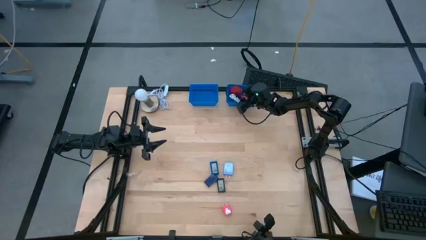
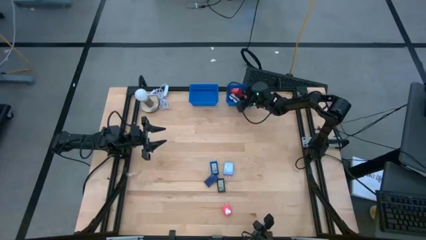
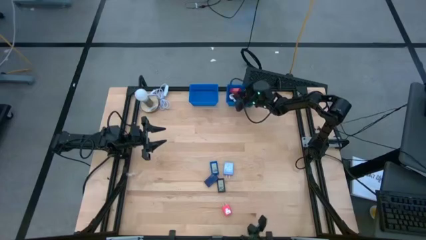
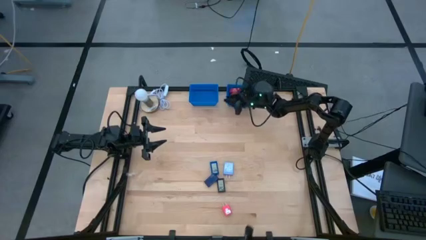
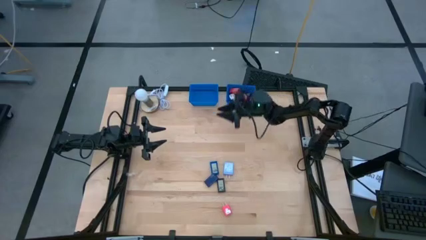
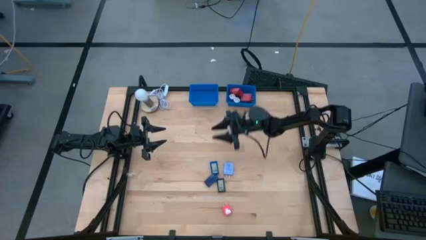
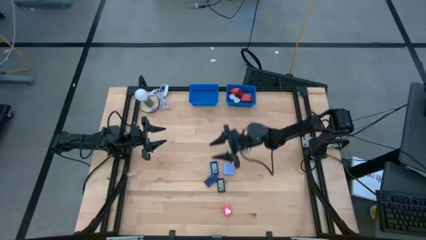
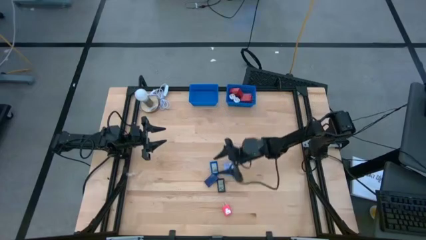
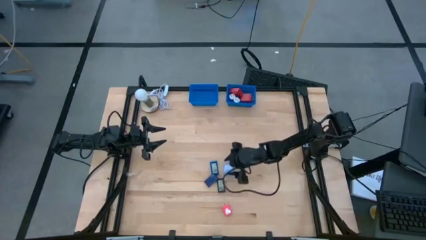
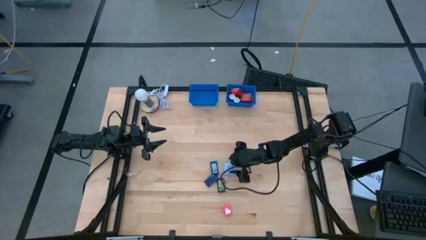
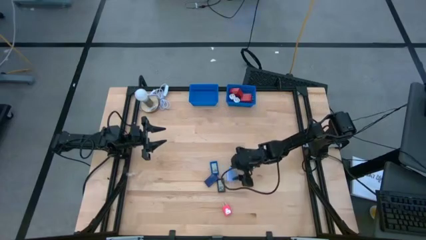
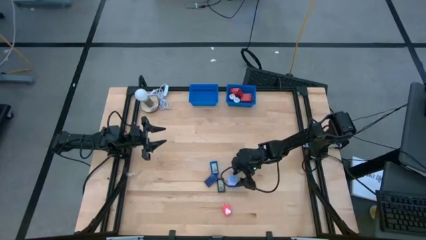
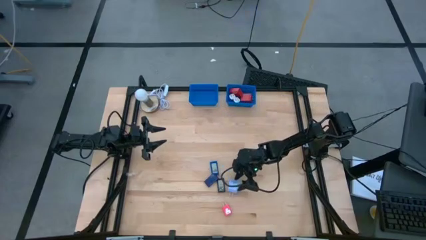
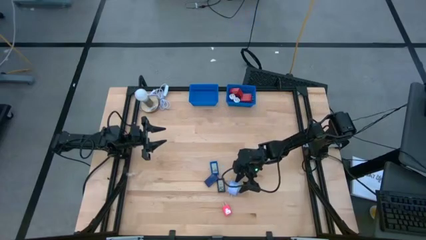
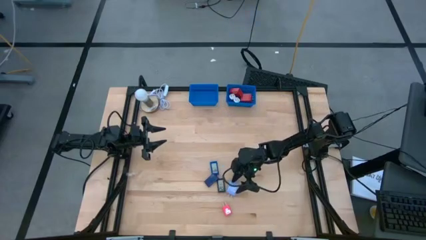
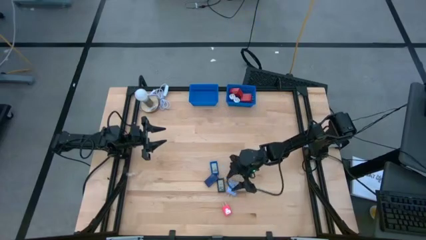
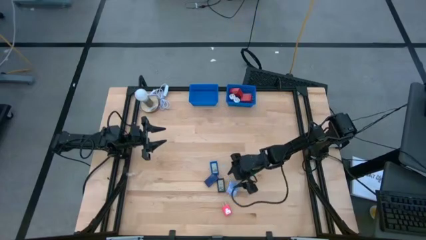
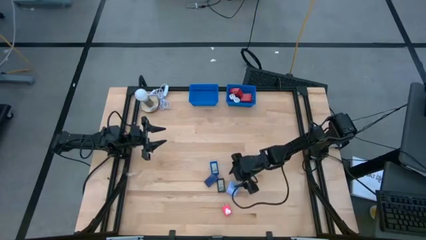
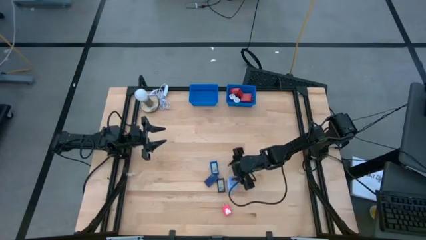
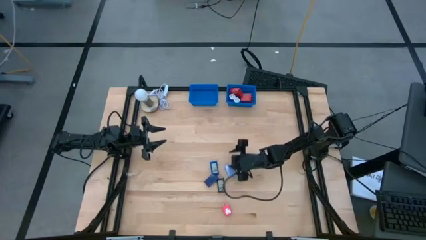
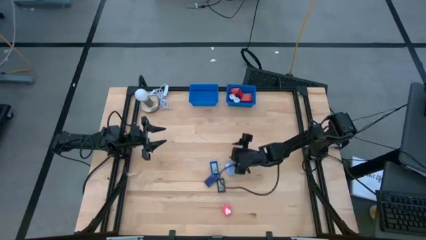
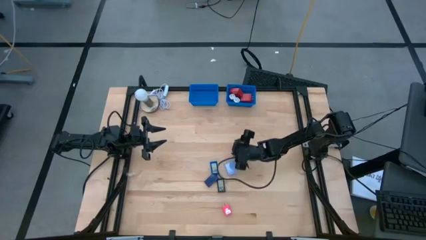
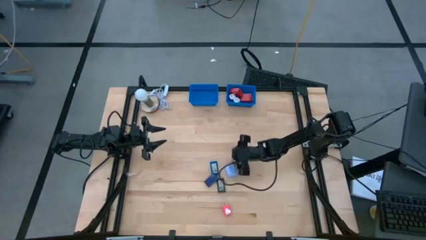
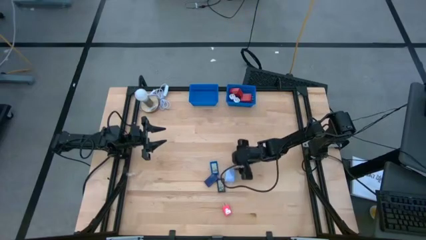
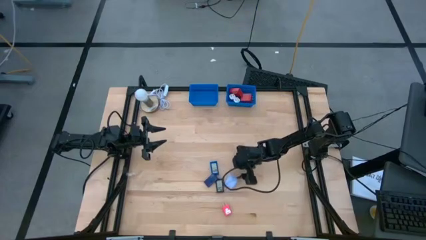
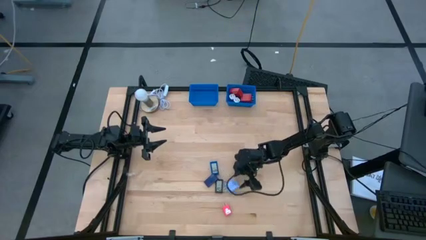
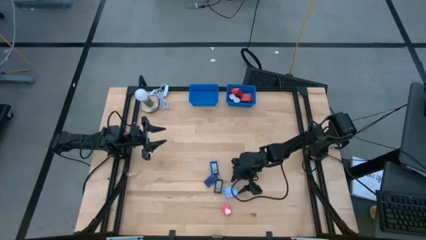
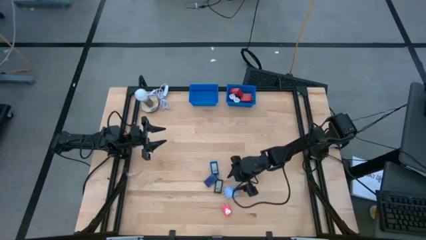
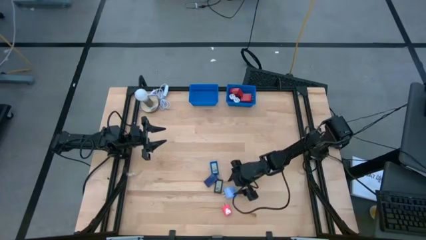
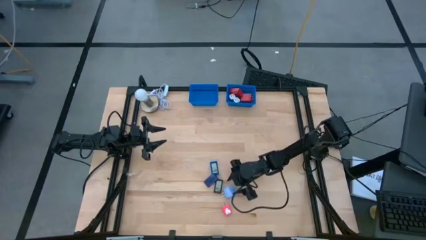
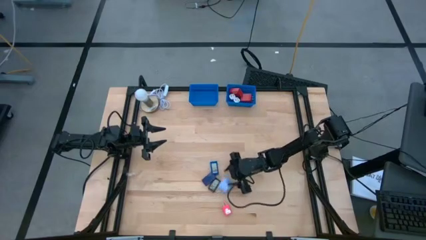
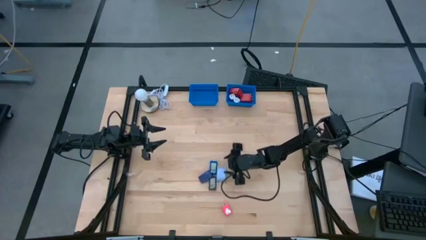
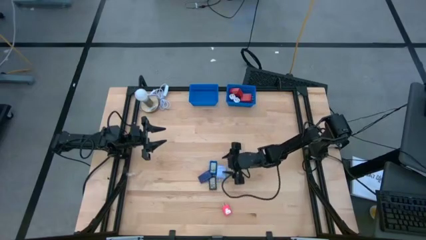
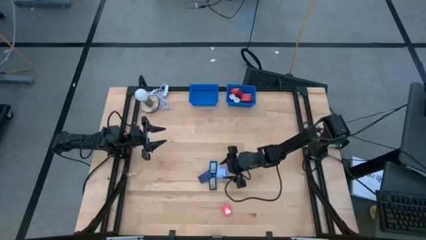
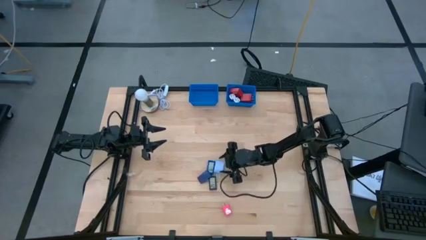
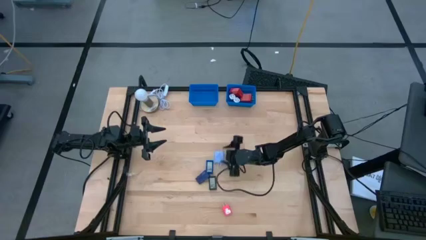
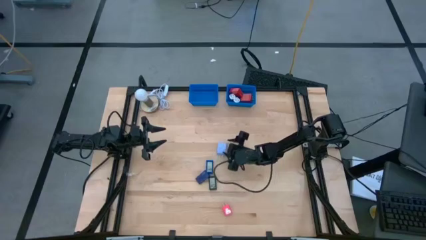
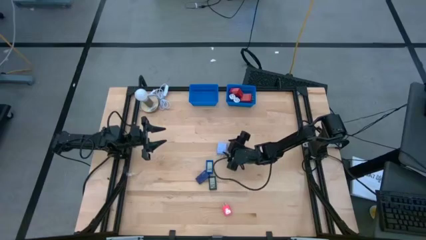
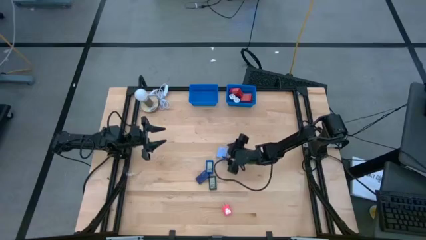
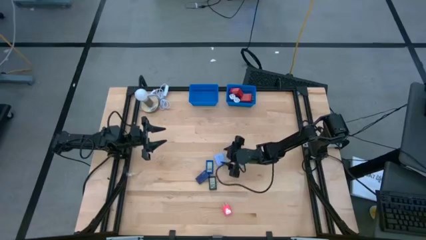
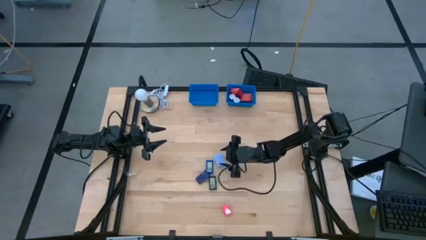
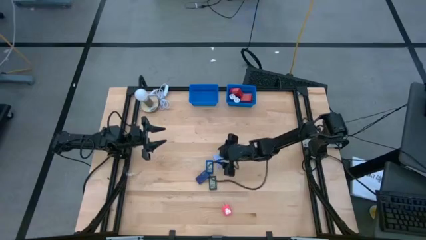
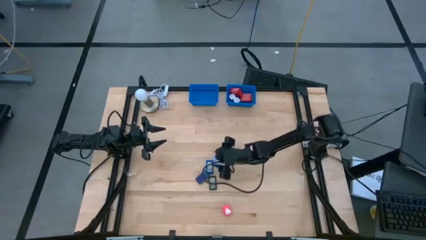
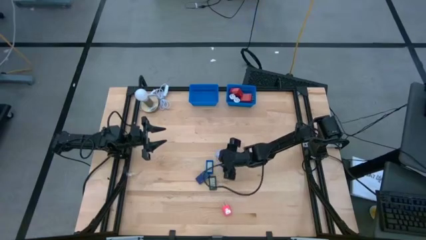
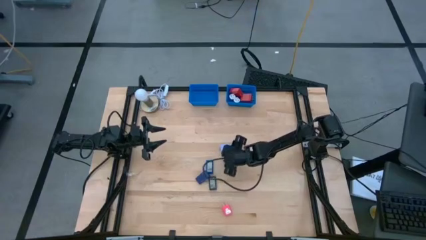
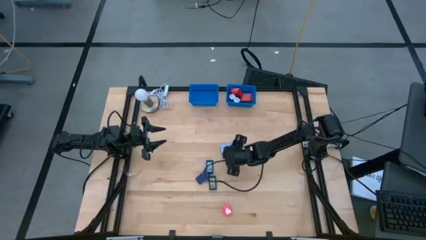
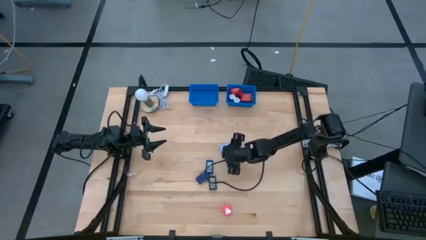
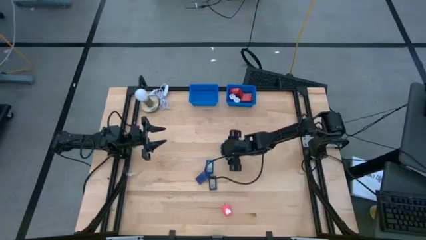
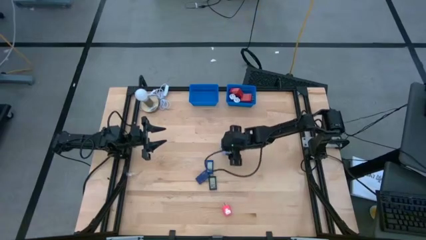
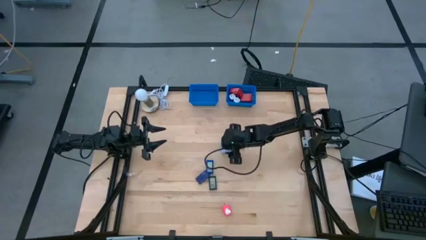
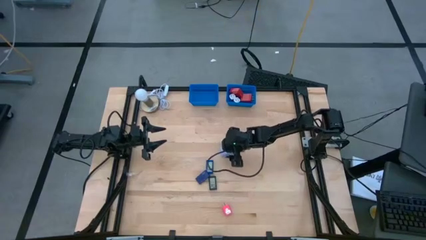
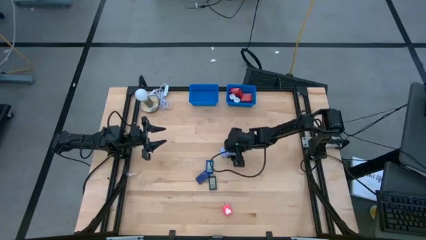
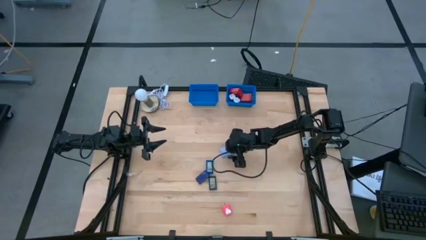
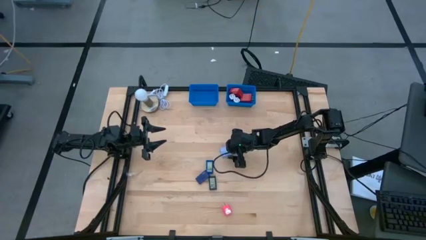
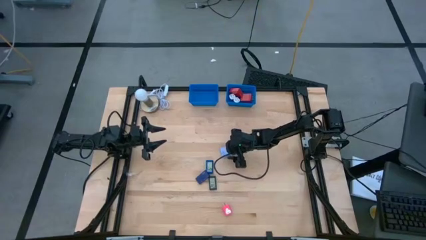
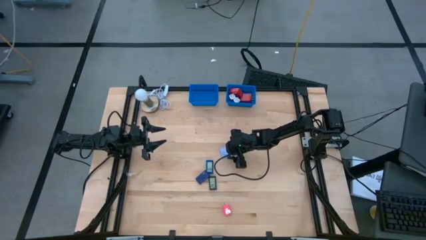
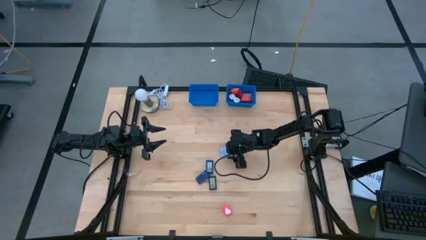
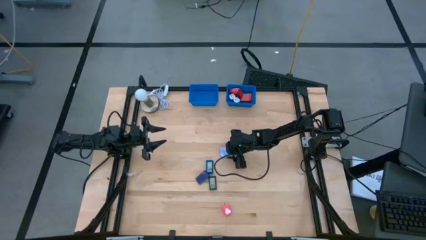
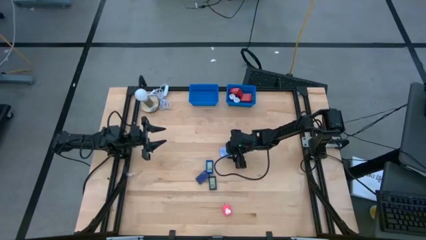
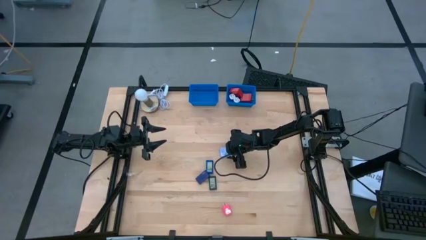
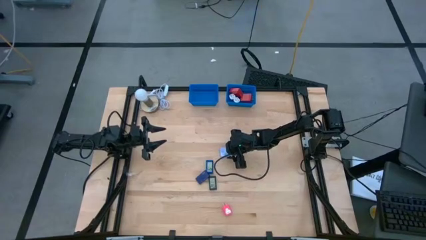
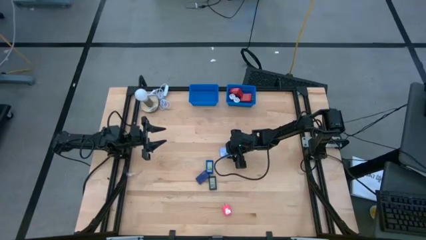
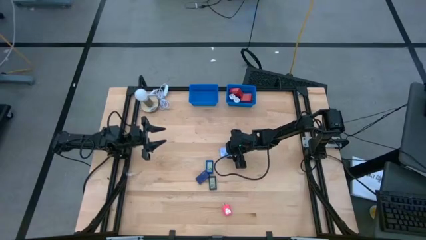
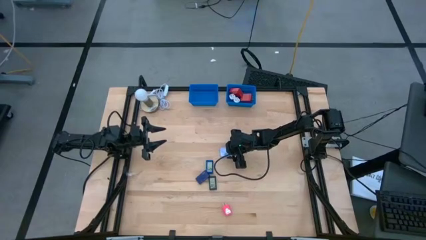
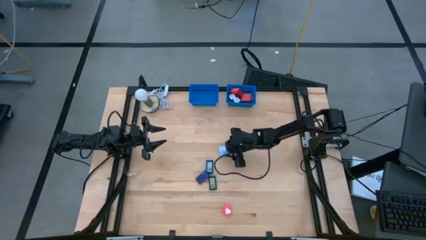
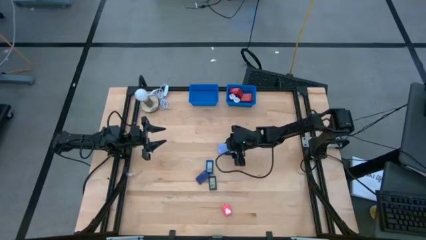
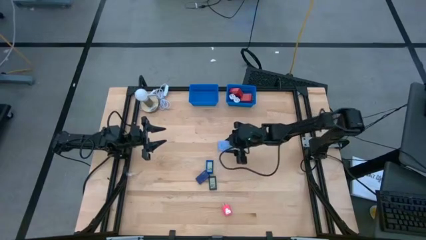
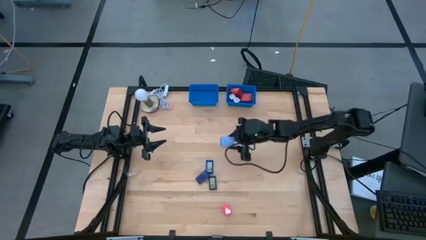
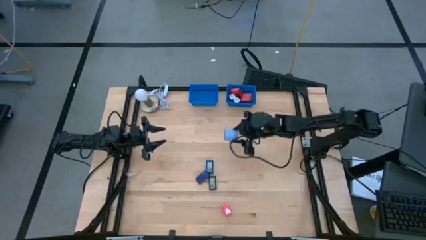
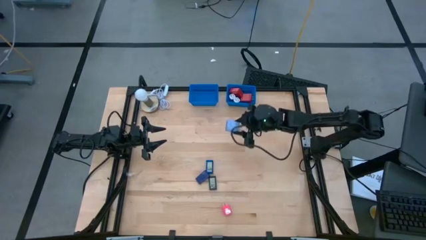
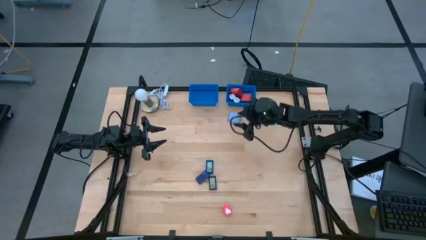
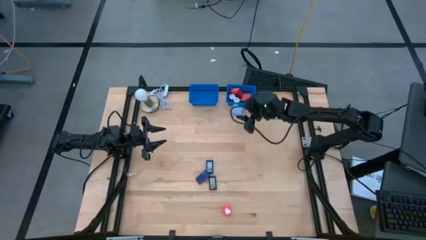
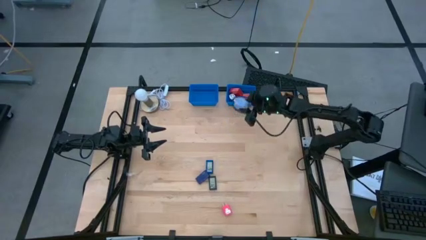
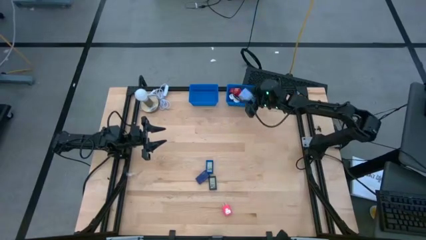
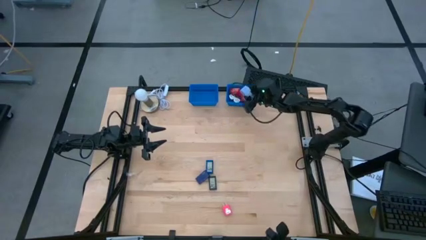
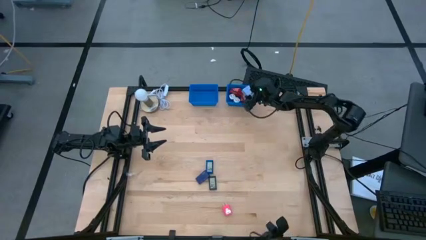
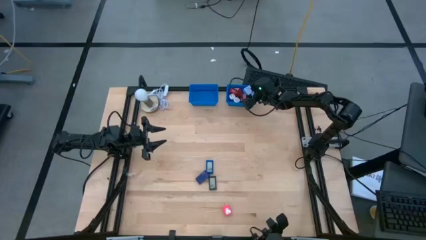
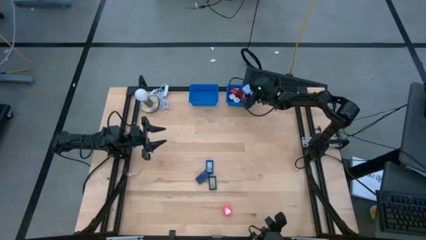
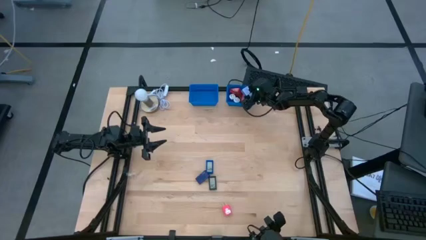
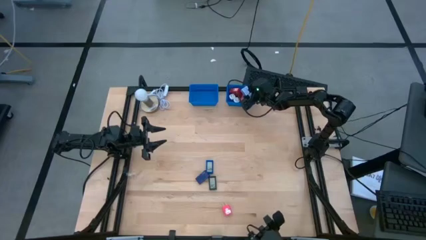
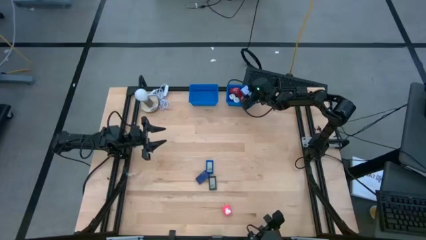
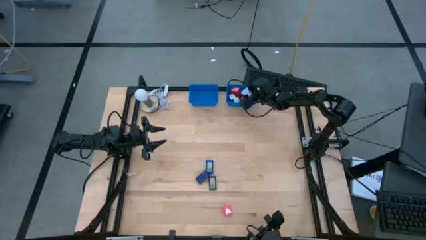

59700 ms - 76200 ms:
Task: Pick & Place Office items
Put the light blue charger adapter into the right blue bin
